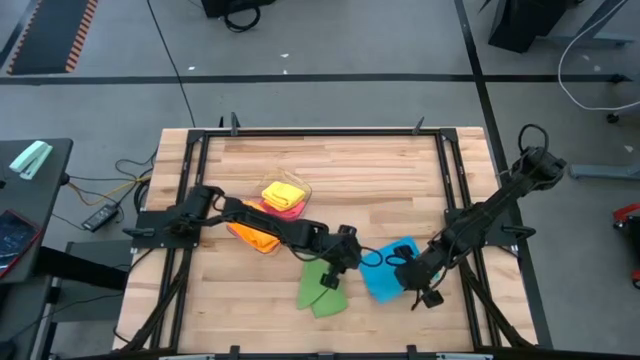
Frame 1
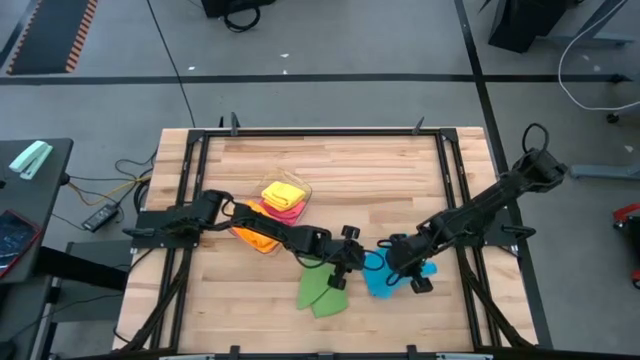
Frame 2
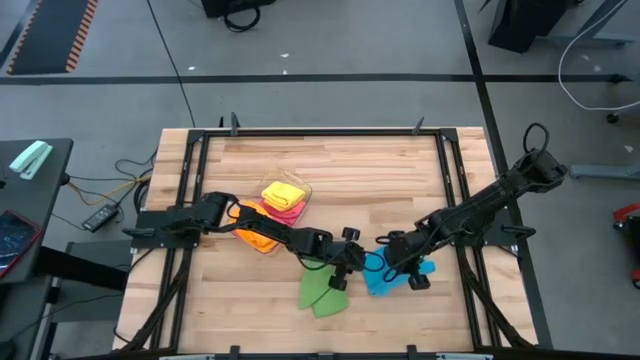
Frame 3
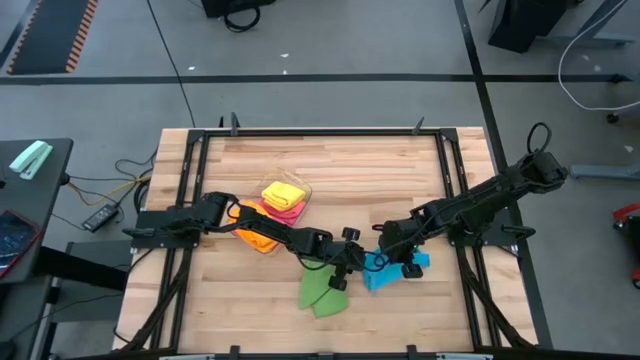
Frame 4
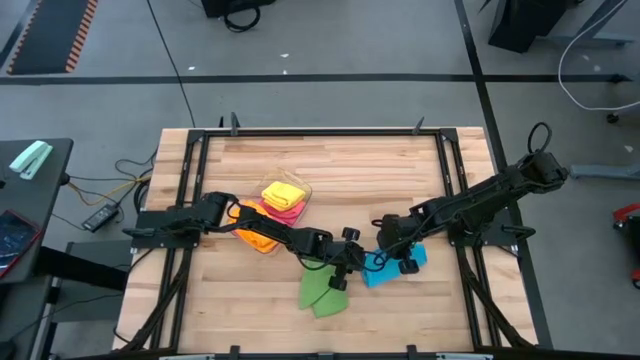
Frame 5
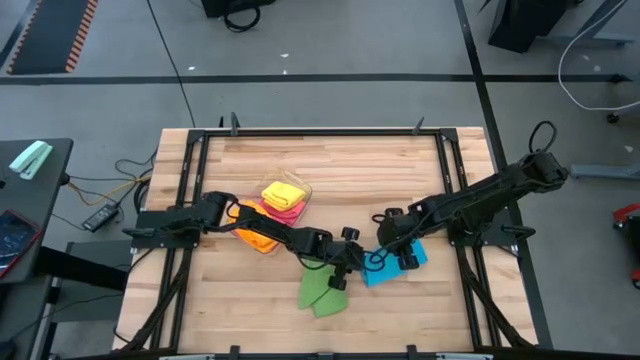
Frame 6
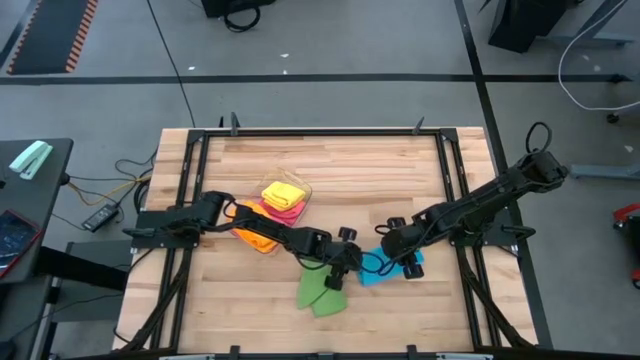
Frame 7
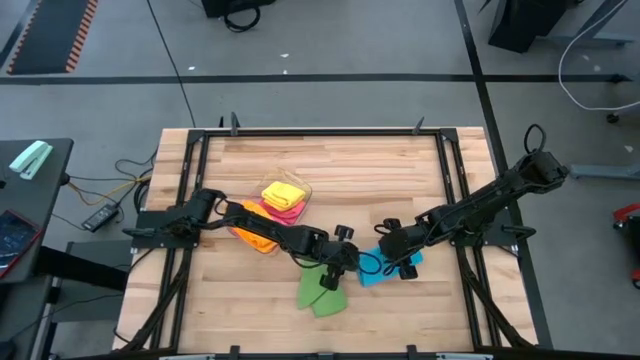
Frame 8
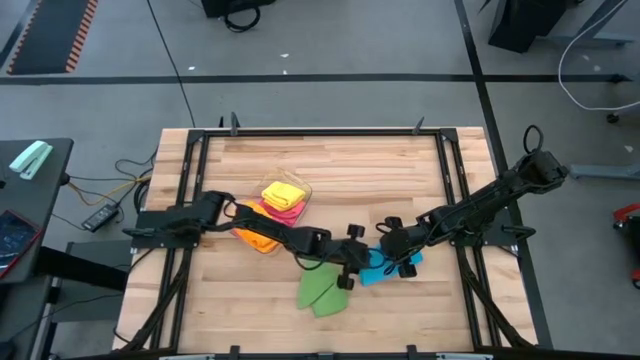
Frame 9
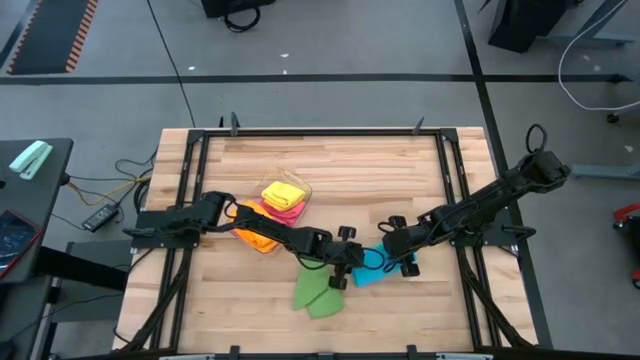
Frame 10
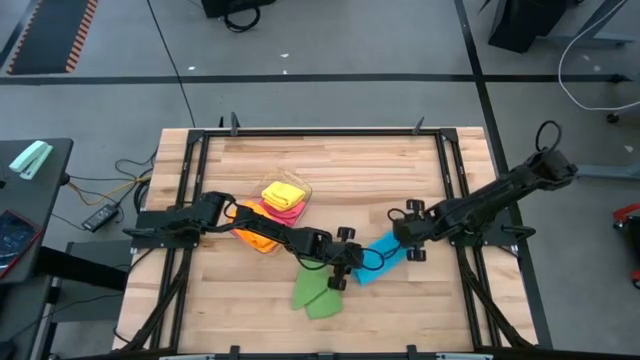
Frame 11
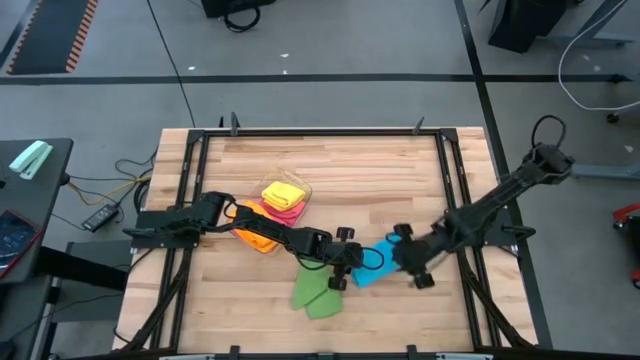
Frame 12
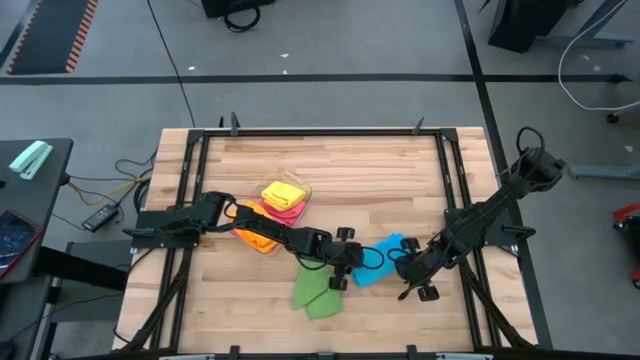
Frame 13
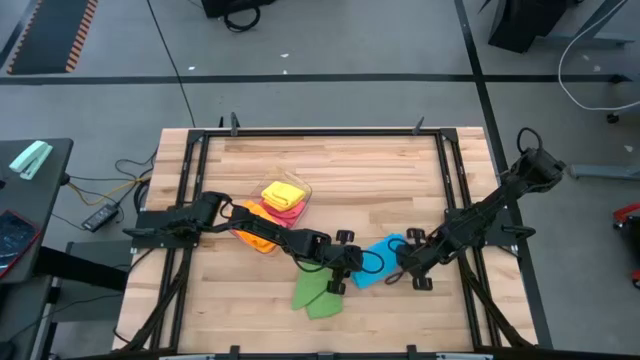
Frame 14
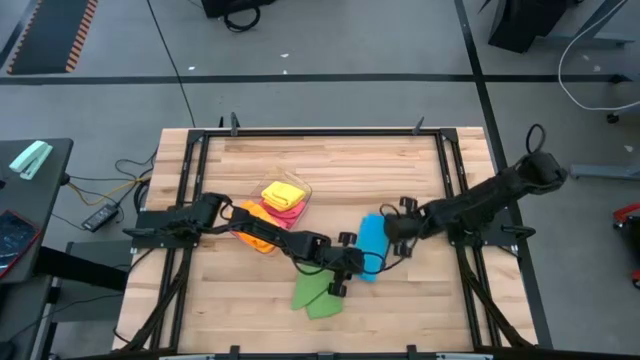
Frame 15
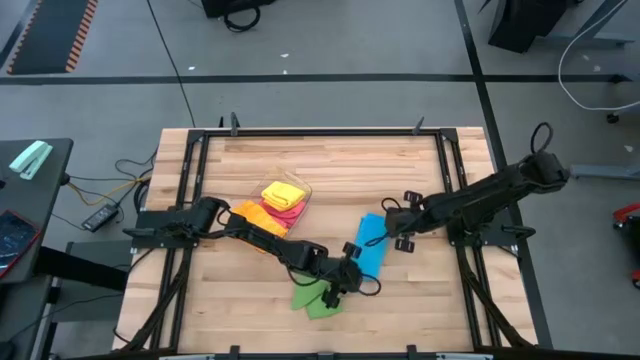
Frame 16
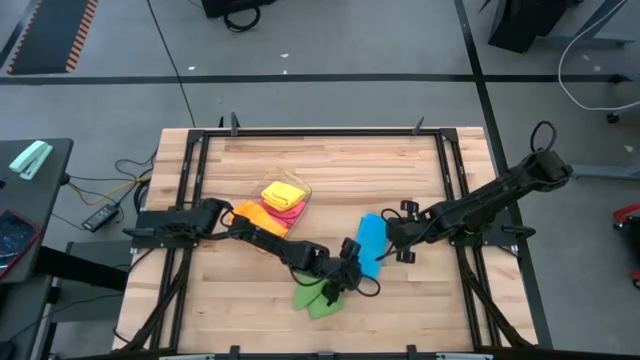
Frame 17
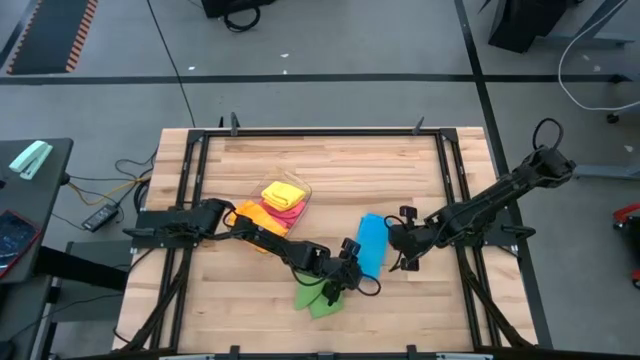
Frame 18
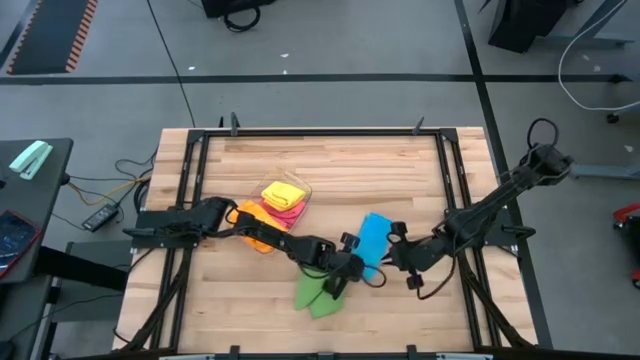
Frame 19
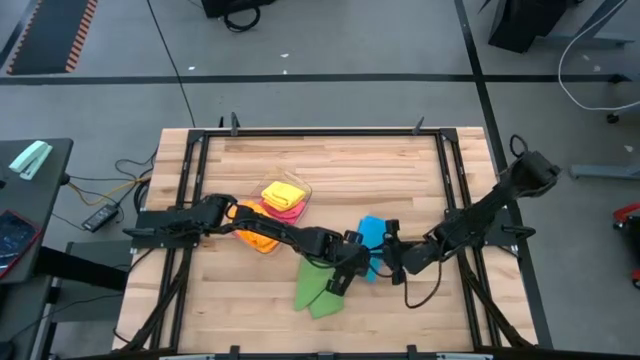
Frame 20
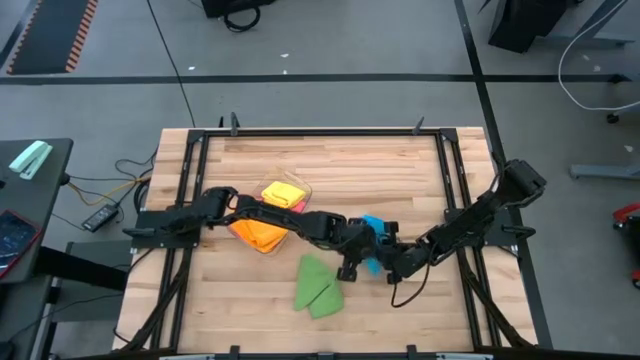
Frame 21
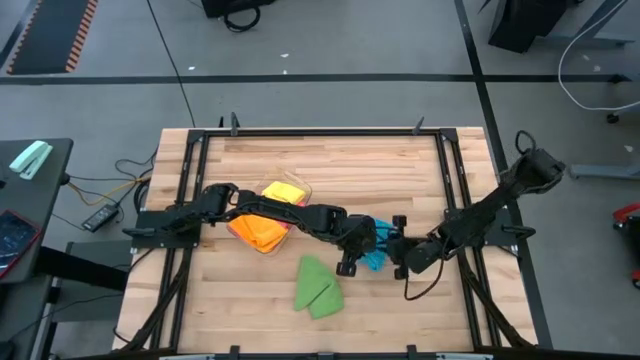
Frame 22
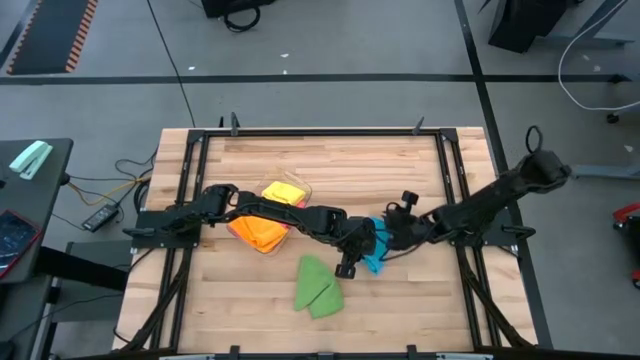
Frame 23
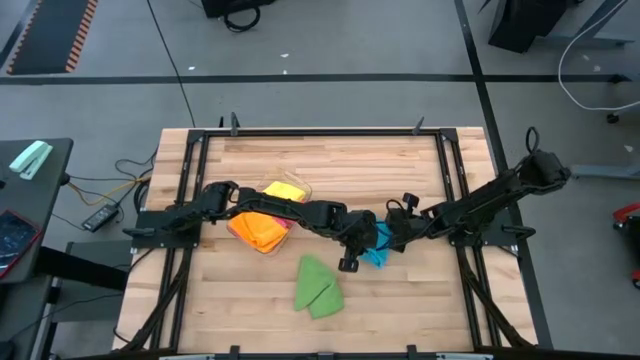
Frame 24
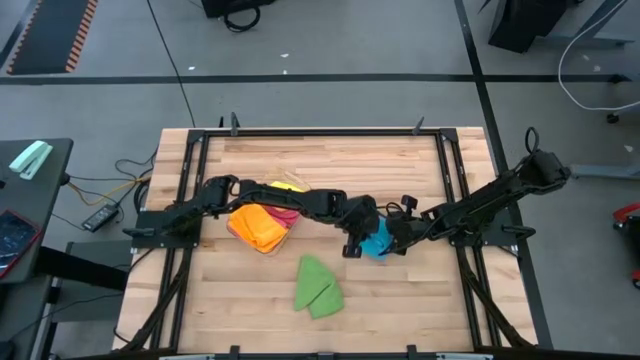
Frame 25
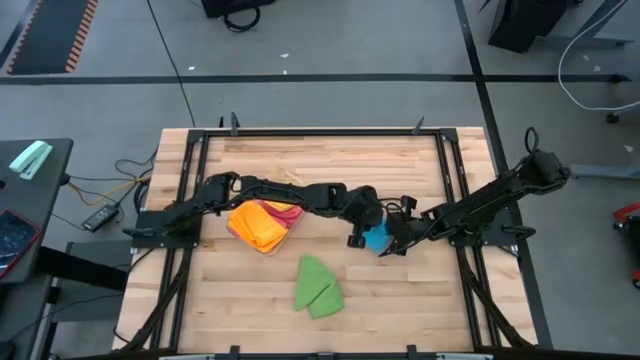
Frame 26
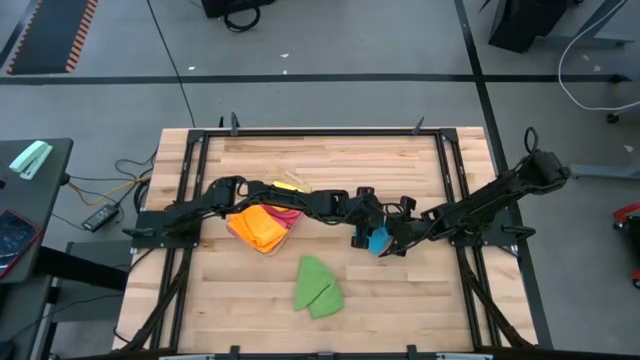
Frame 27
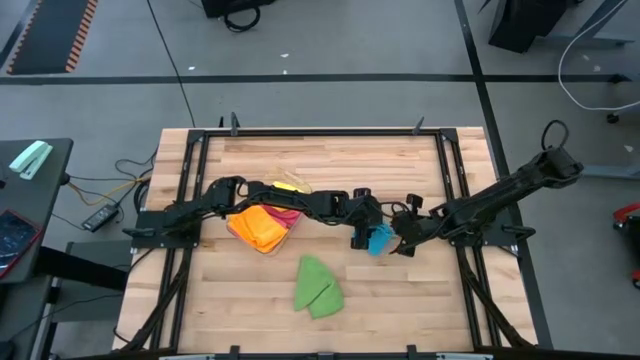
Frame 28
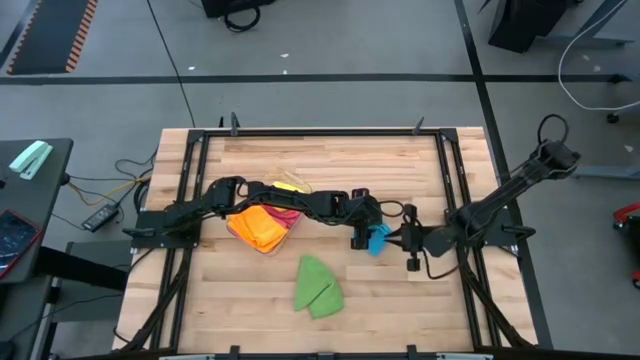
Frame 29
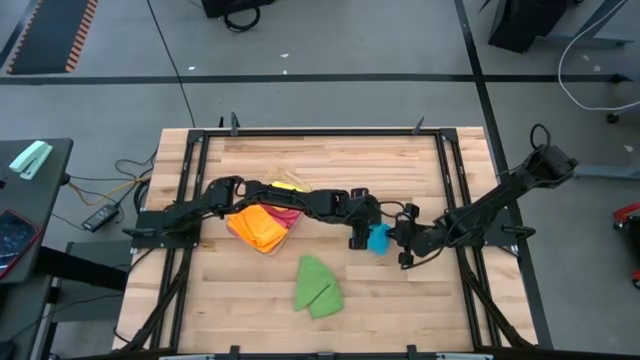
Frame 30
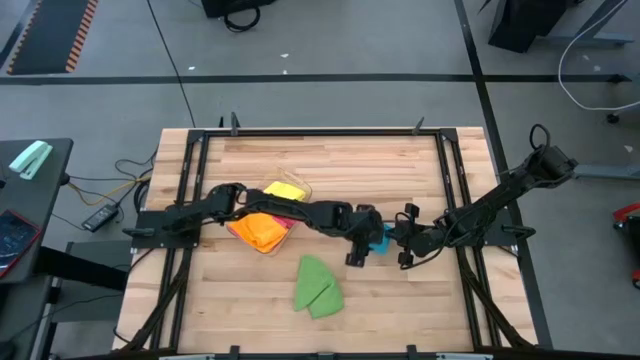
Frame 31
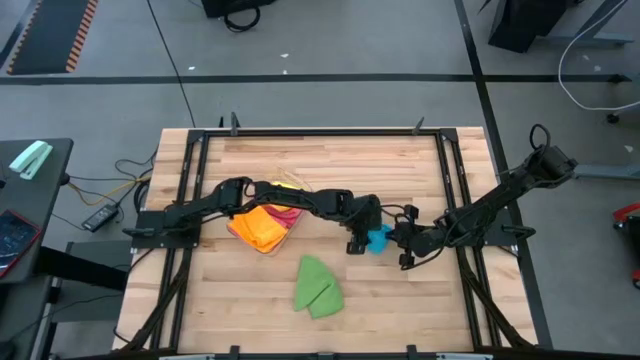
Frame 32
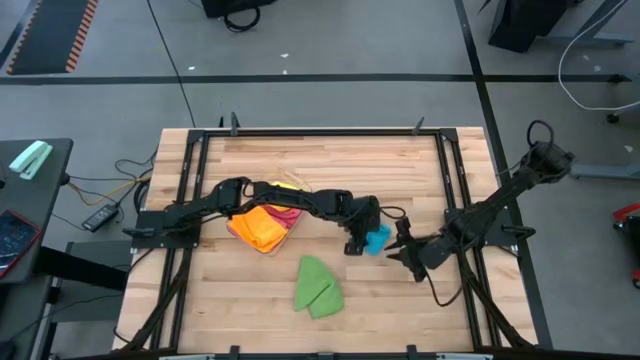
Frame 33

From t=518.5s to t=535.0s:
Task: Fold microfiber towels
Fold the blue microfiber towel
